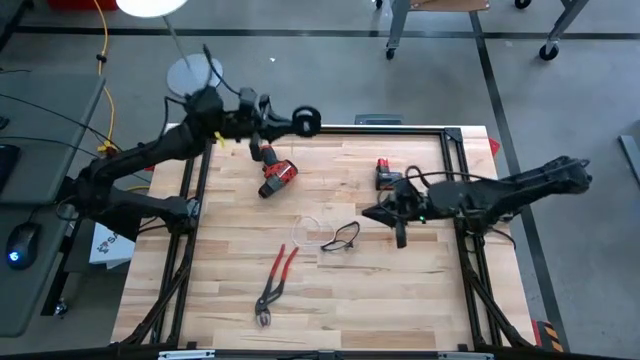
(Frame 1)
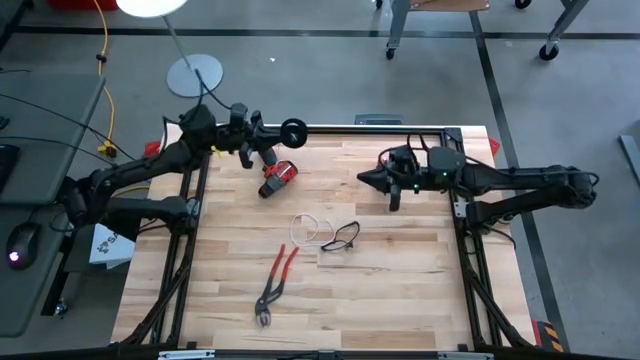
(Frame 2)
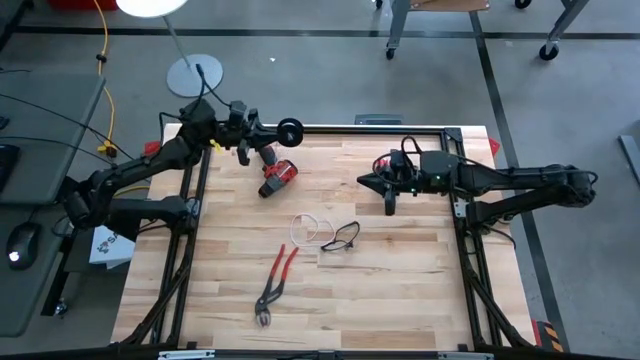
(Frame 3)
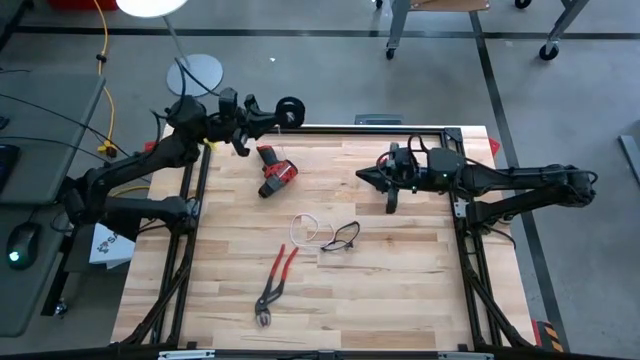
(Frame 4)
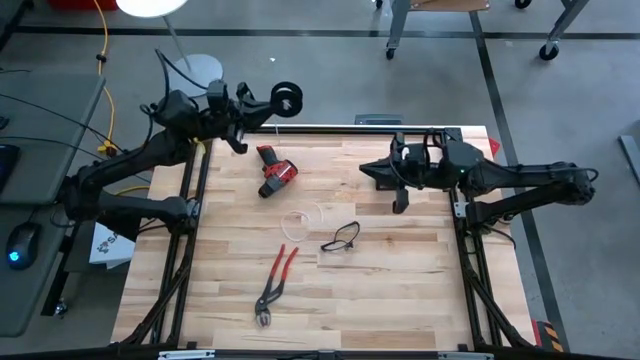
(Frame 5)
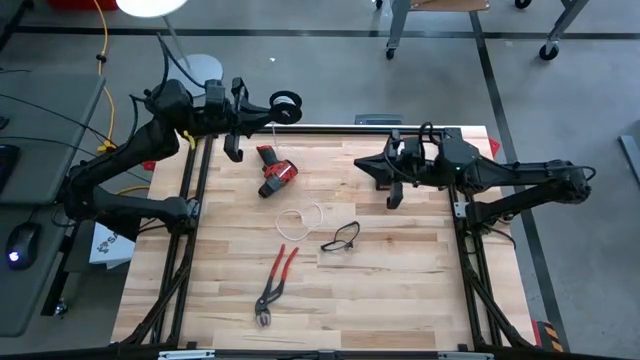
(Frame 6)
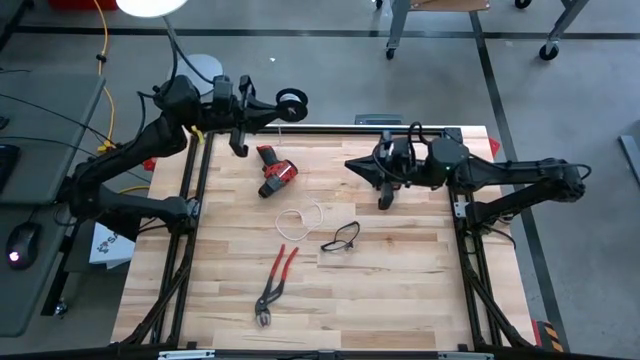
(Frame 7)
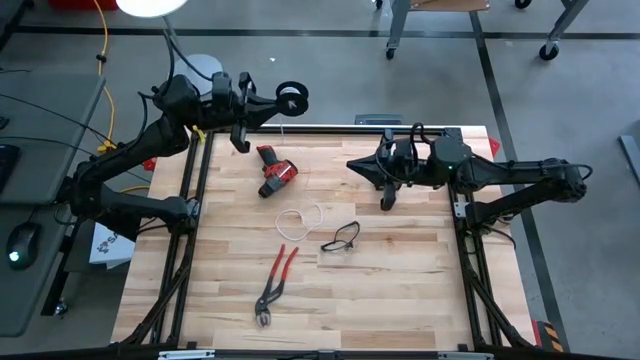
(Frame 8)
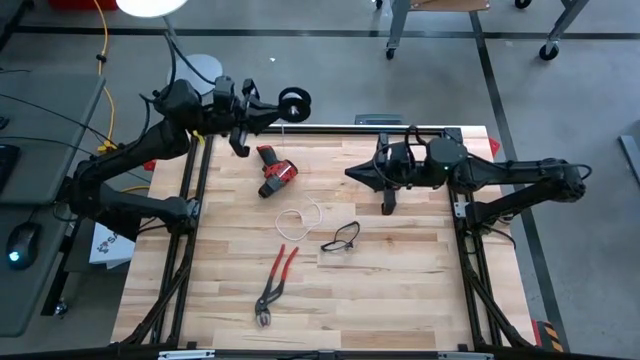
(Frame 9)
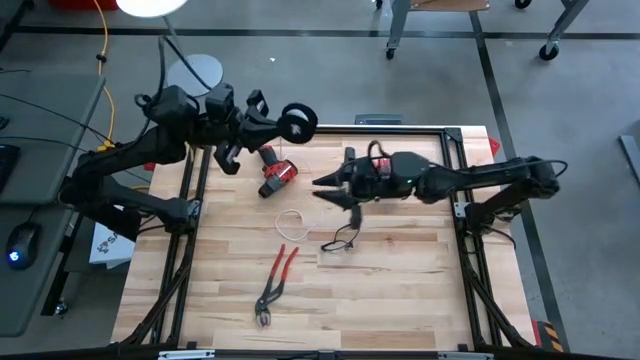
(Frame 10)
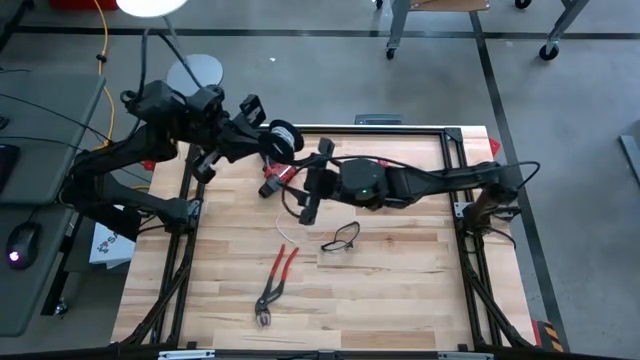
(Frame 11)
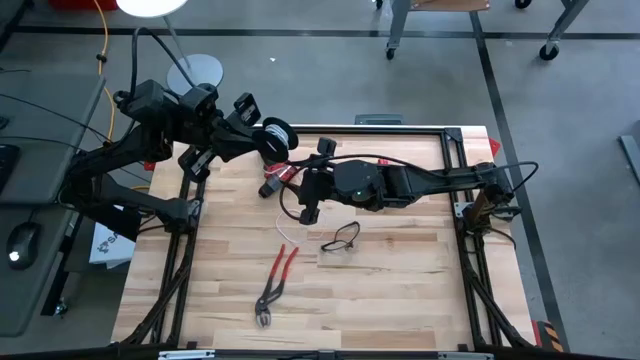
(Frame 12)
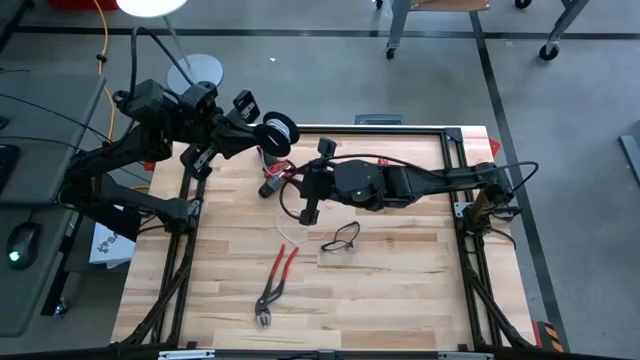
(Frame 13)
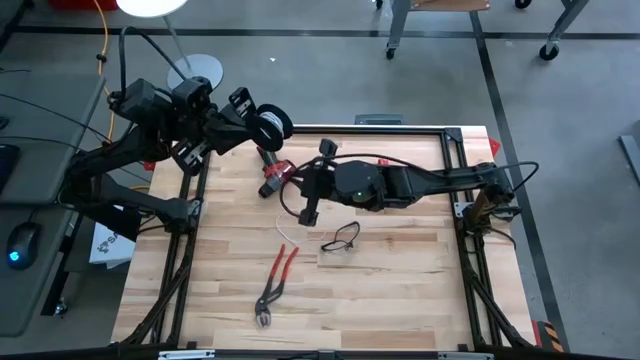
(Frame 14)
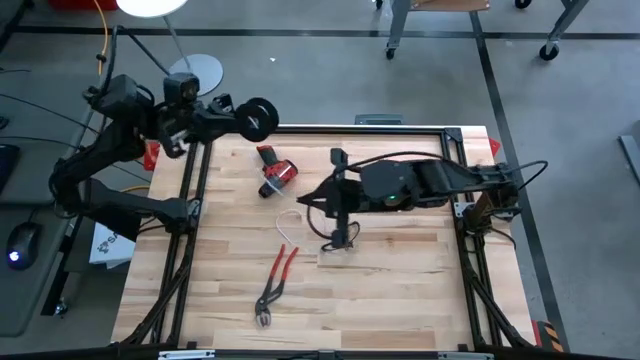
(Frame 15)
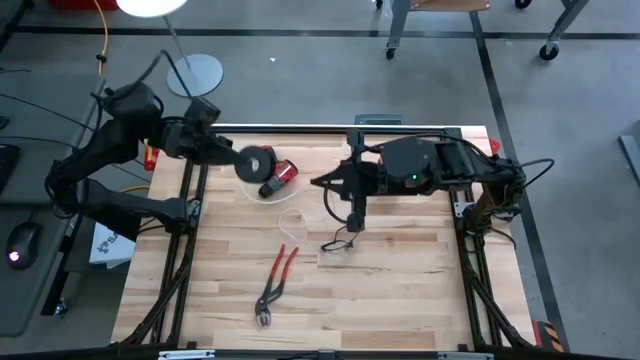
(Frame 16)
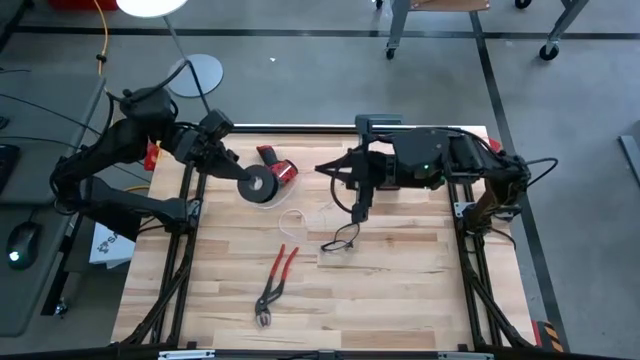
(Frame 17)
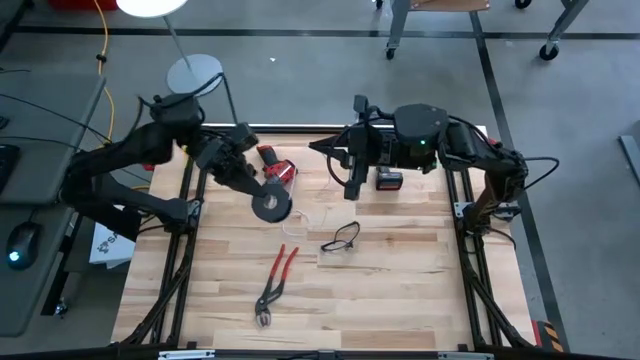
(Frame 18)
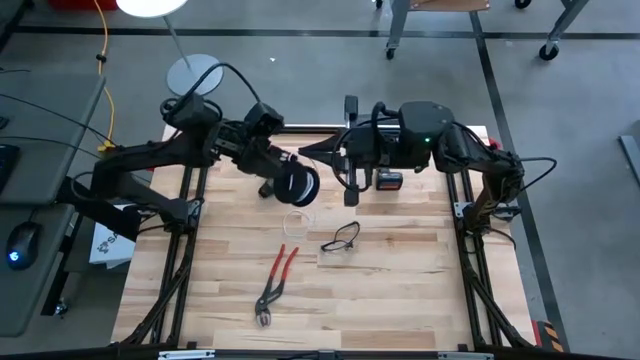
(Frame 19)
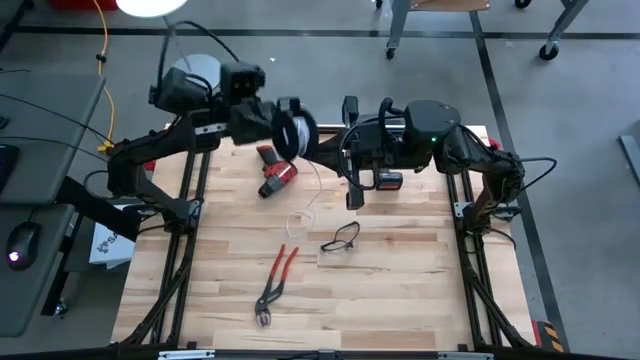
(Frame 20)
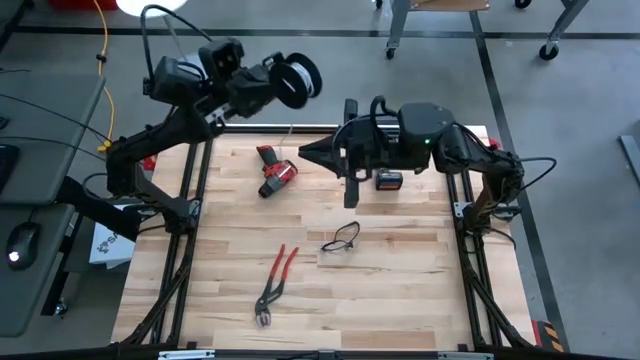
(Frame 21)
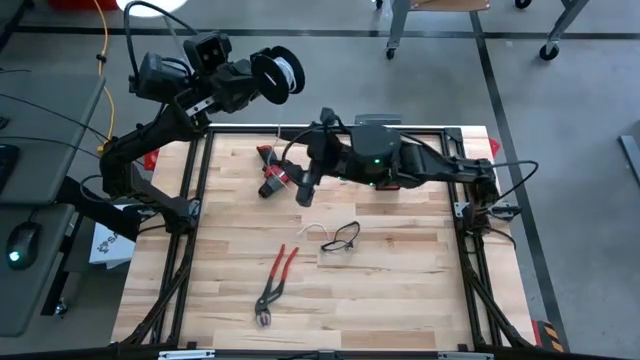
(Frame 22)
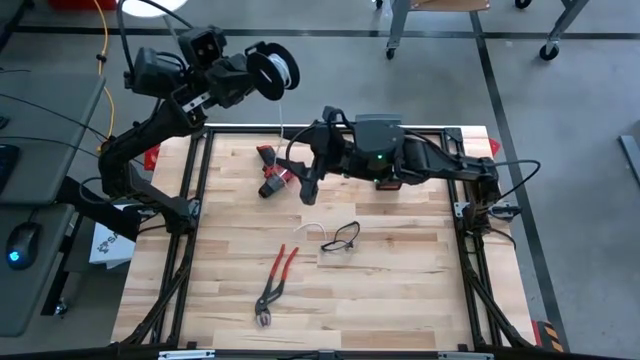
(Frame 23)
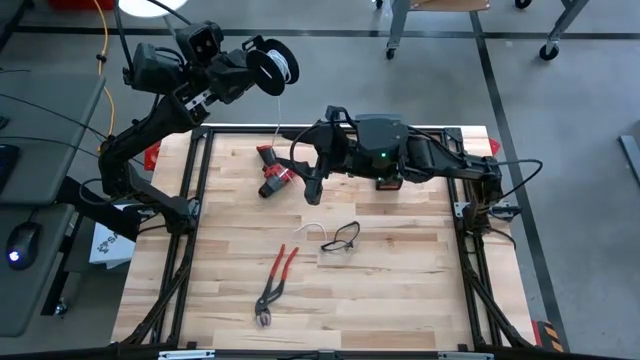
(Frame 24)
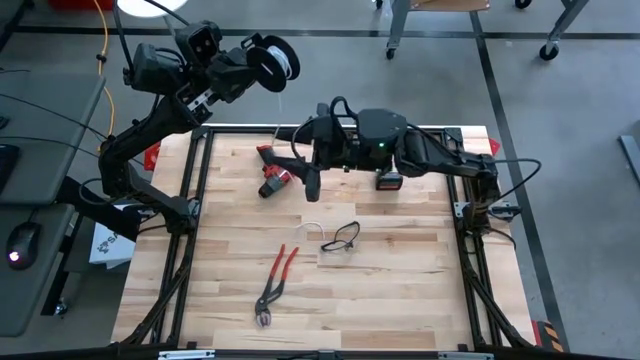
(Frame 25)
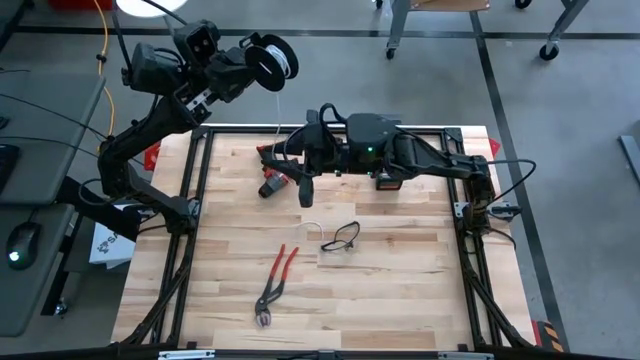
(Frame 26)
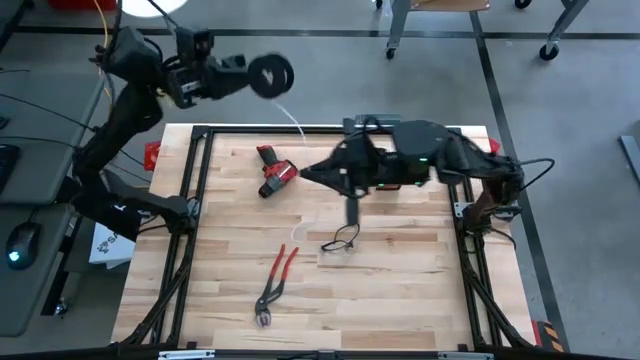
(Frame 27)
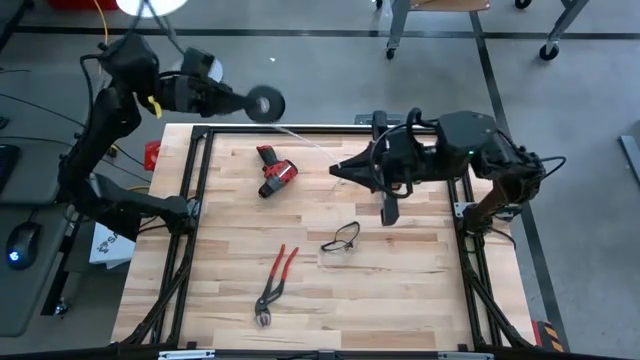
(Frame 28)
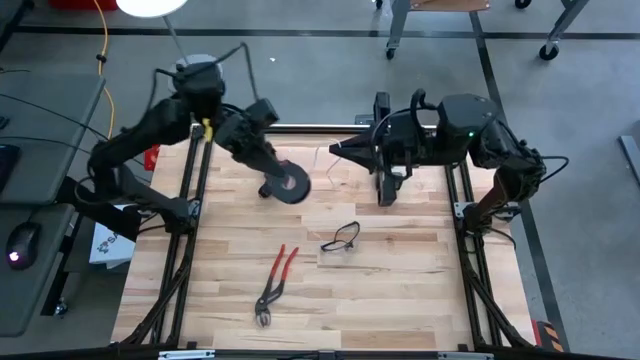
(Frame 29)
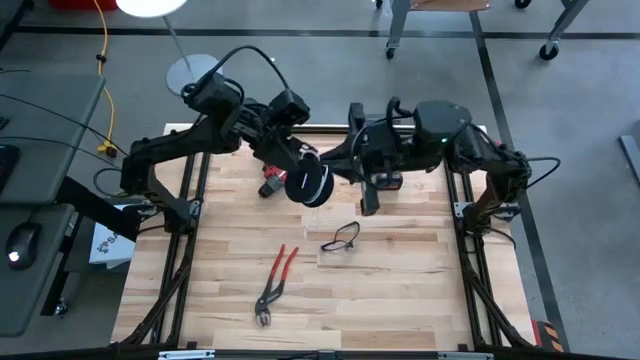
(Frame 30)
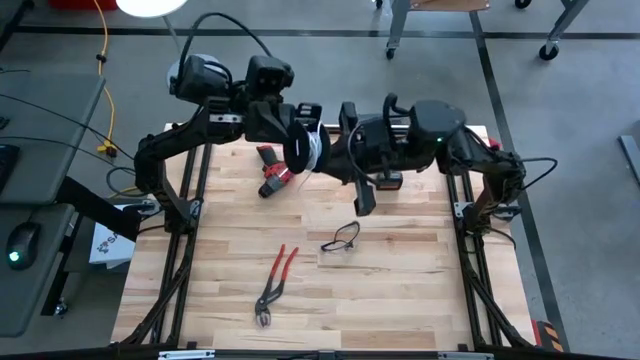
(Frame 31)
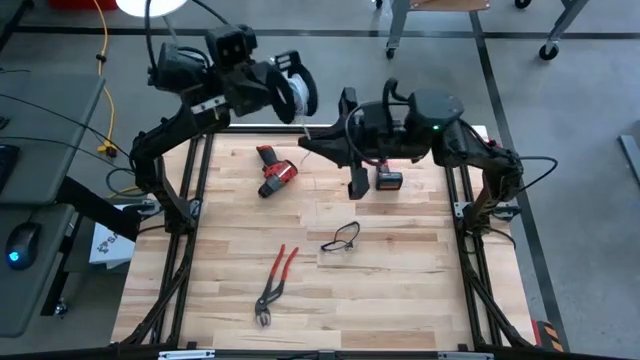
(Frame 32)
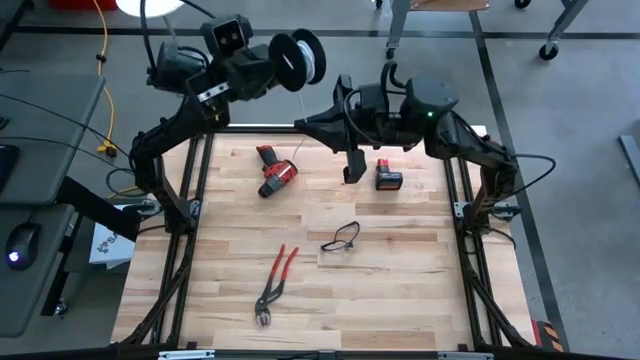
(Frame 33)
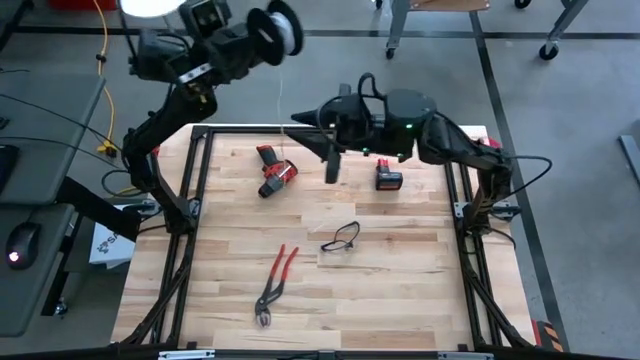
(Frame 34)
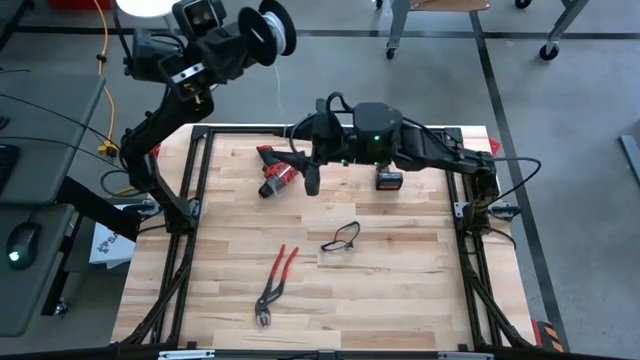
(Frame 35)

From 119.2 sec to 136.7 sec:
Task: Coil cords
Coil the white wire onto the black spool

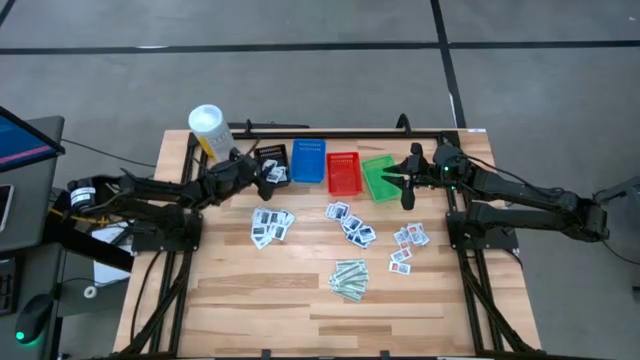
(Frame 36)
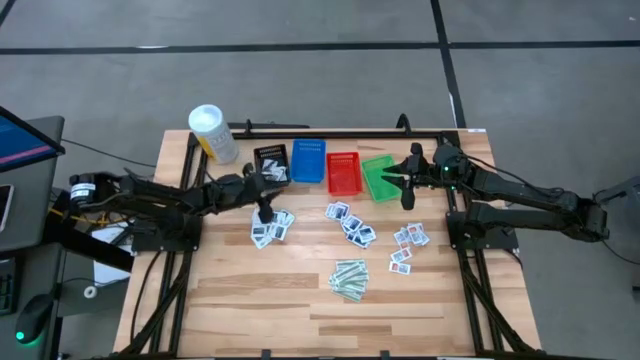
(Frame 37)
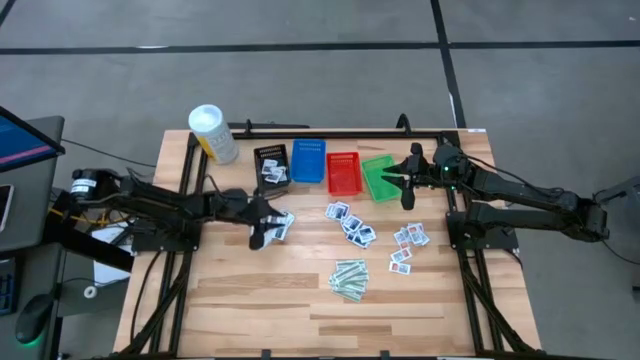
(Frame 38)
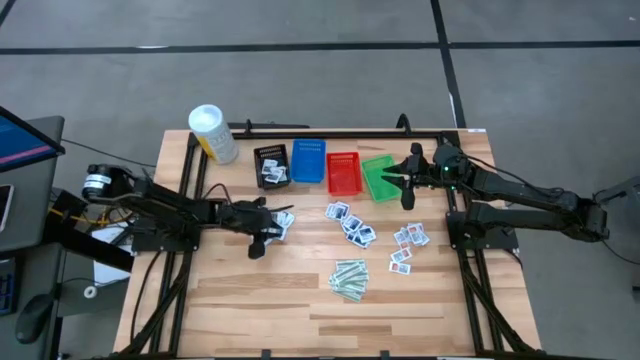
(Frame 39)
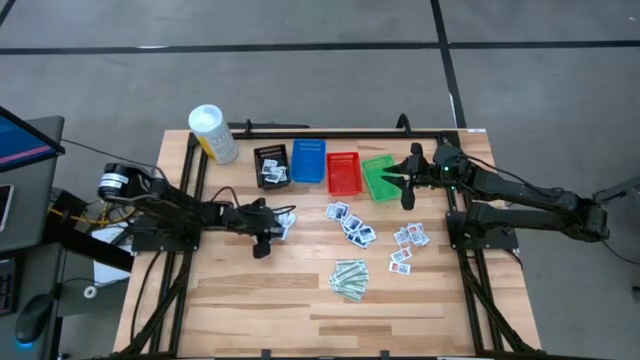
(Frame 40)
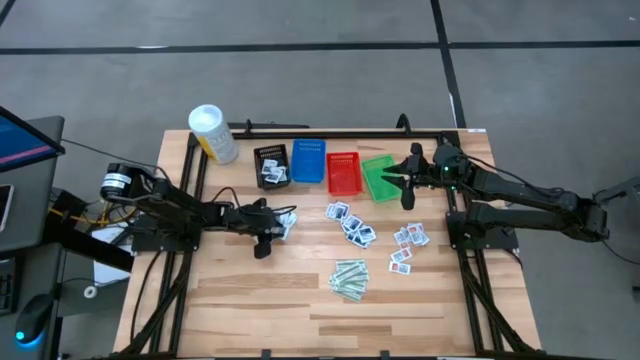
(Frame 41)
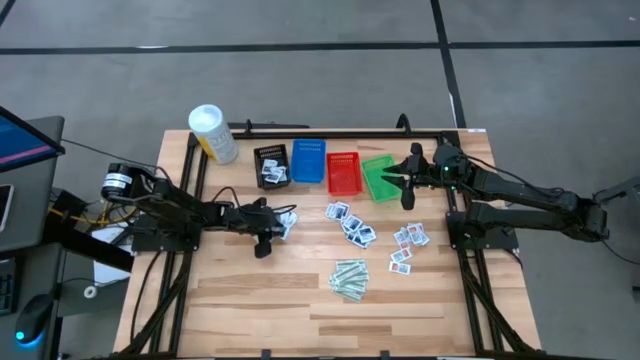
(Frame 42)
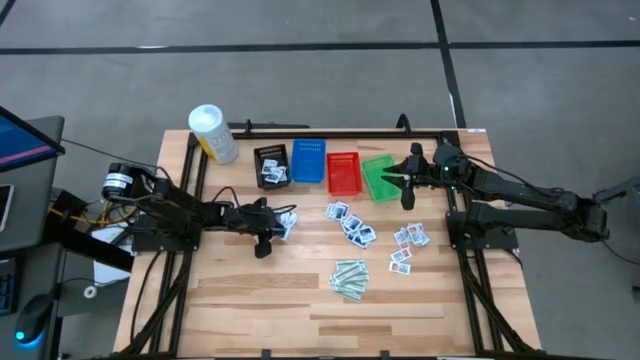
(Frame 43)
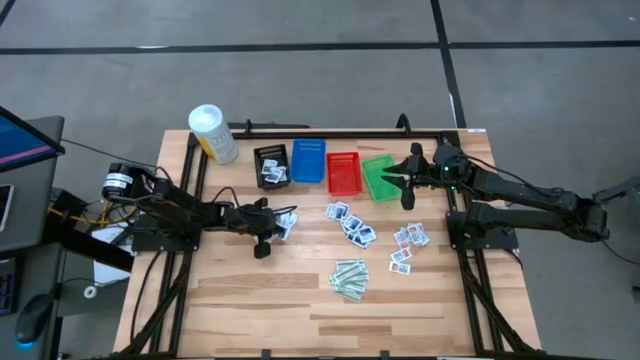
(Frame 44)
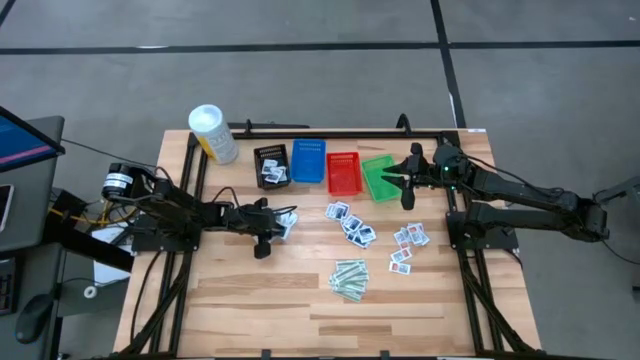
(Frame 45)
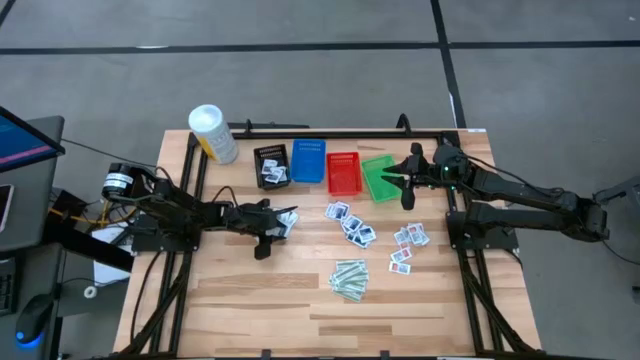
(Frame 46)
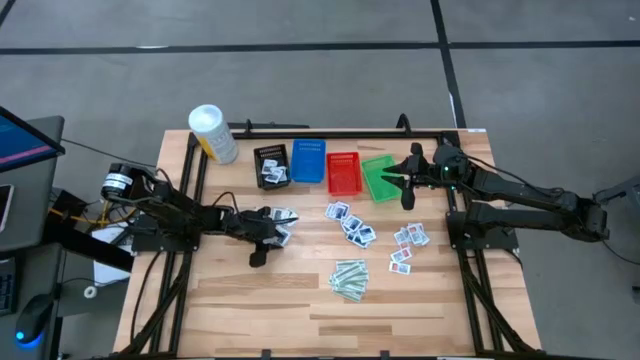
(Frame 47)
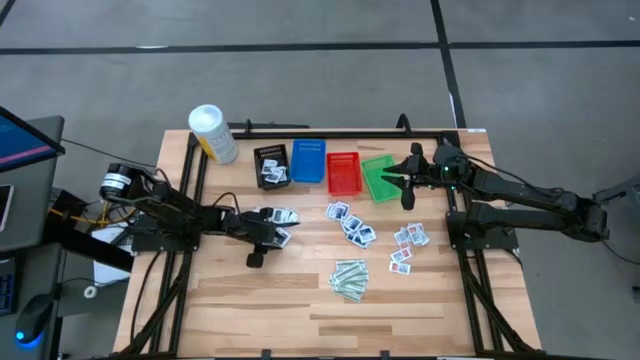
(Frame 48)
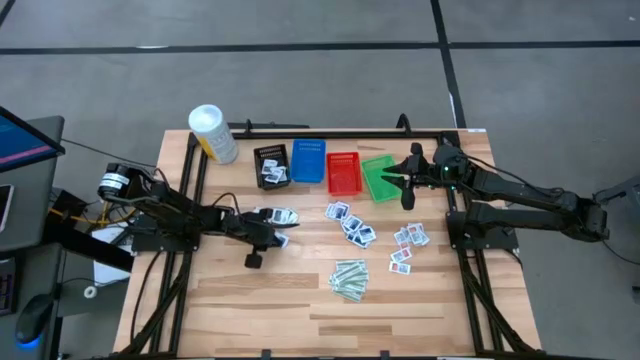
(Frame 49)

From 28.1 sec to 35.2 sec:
Task: Pick & Place First Aid Supplies
Put the gray pad into the black bin
